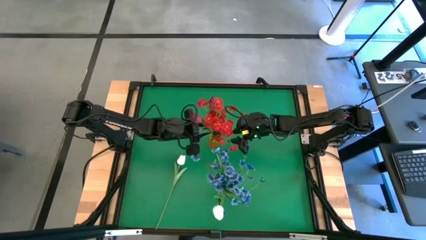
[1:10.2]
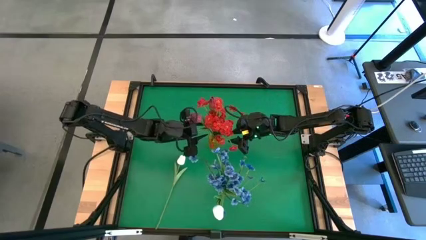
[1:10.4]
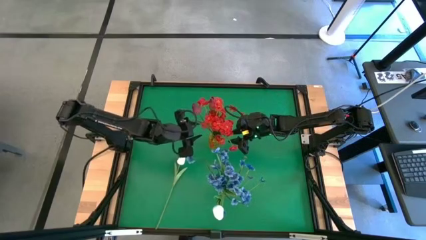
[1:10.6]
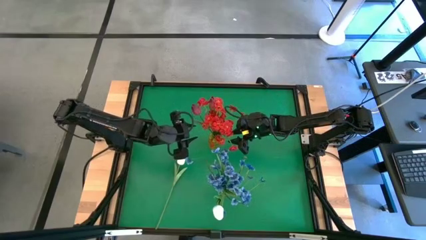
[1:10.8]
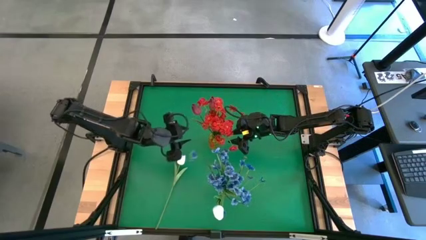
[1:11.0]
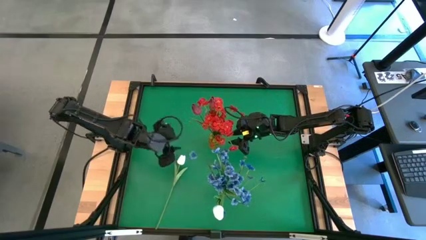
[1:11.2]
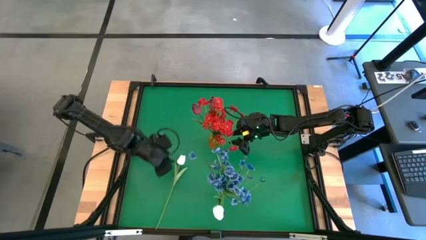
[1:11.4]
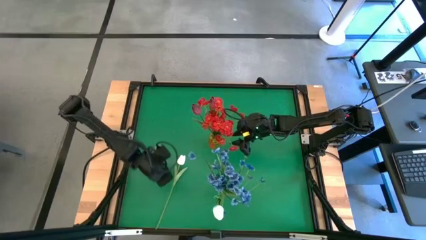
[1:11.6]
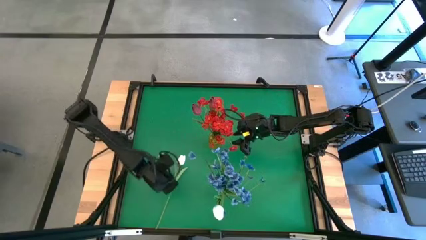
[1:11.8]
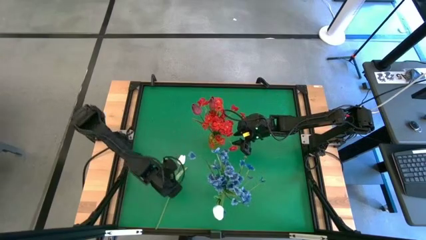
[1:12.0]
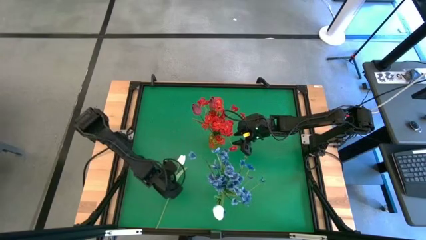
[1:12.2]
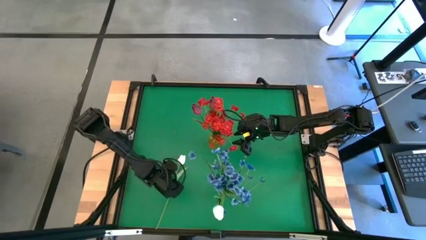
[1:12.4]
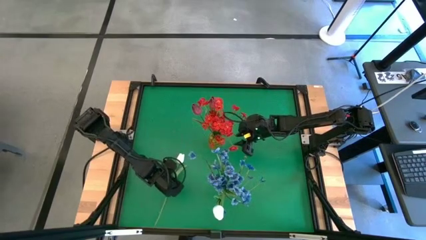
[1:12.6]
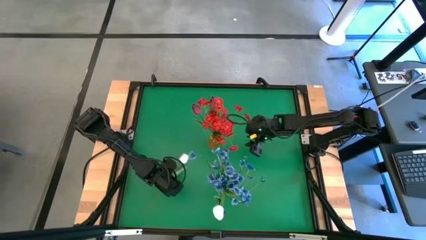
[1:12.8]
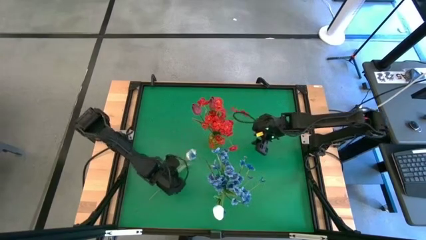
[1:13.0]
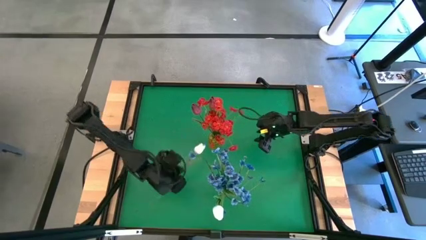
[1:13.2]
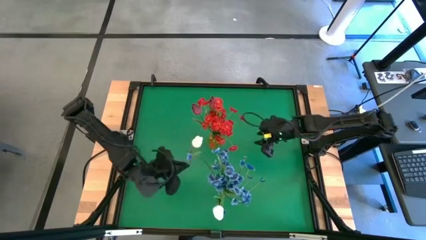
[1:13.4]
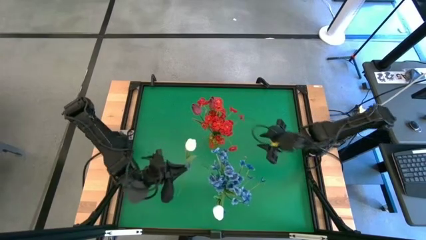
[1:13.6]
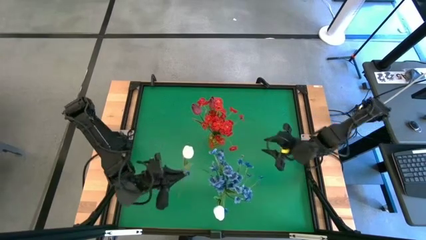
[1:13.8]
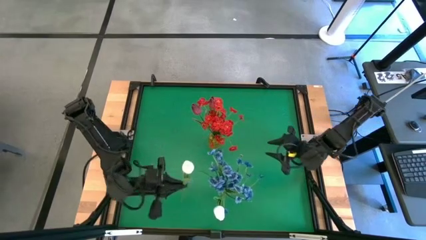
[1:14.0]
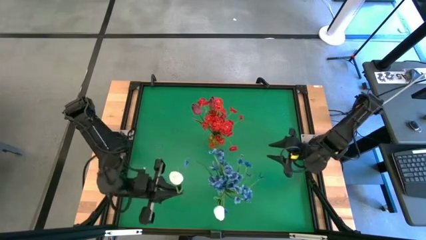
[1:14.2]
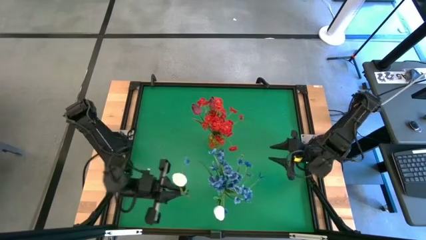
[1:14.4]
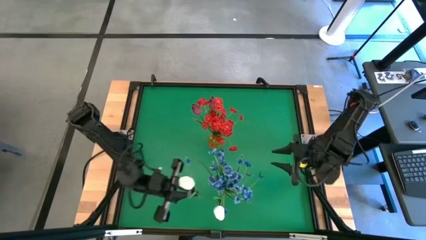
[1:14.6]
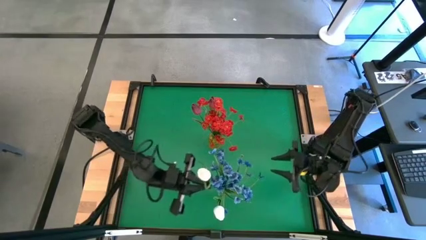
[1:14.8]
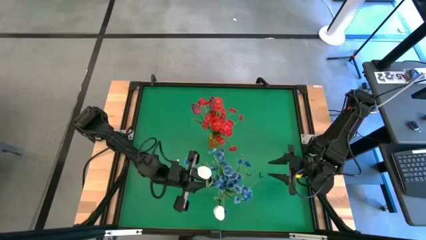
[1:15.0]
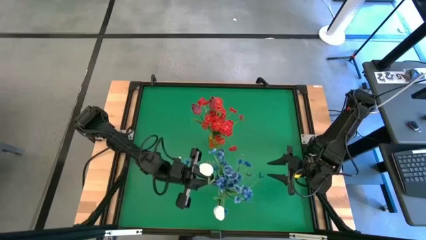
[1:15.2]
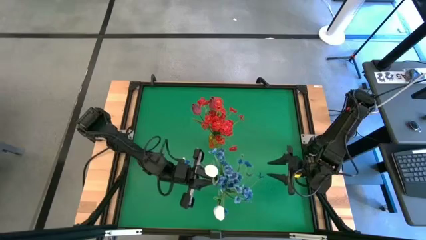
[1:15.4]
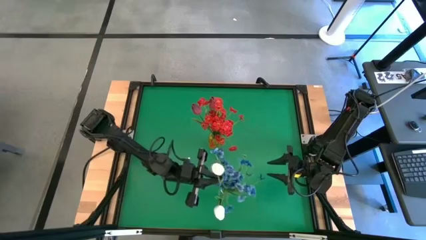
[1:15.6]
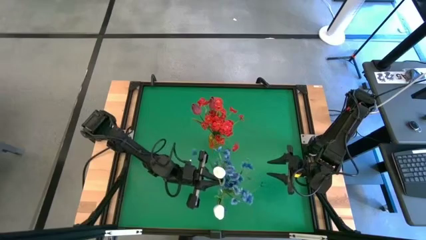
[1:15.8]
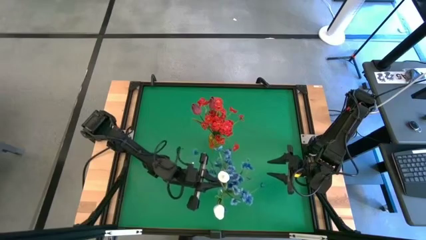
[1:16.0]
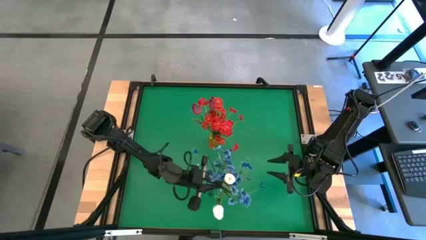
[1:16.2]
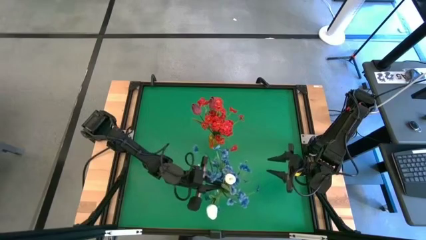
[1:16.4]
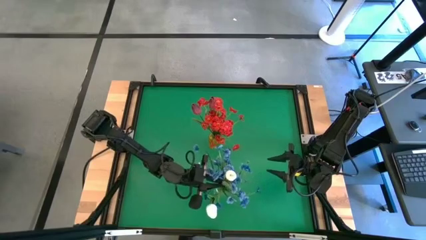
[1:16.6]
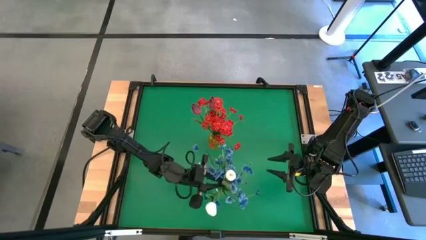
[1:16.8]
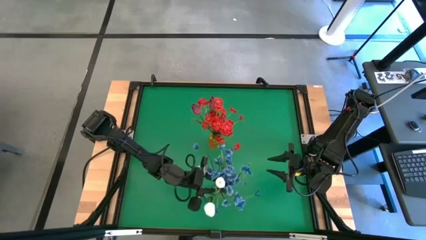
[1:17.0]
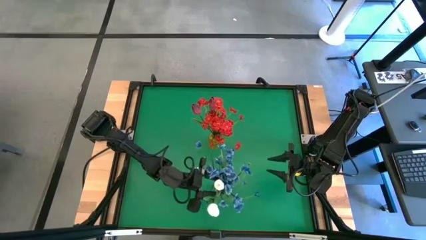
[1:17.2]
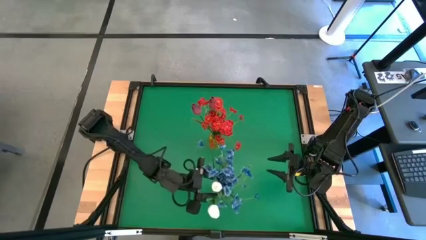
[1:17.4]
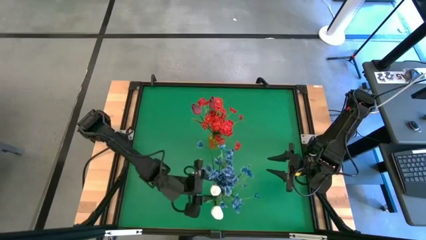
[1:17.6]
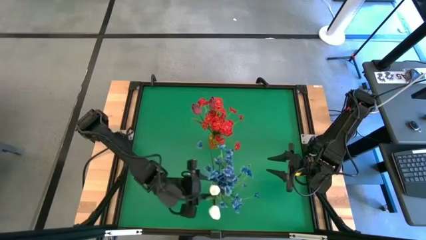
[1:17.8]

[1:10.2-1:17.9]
Task: Sort flowers into vase by color
Put the white flower into the transparent vase

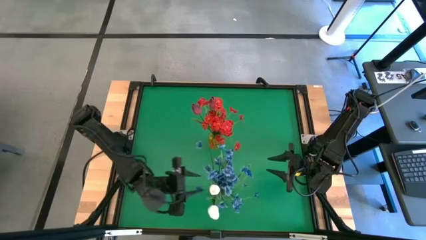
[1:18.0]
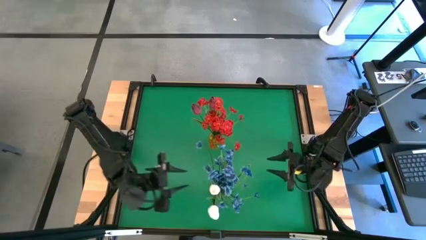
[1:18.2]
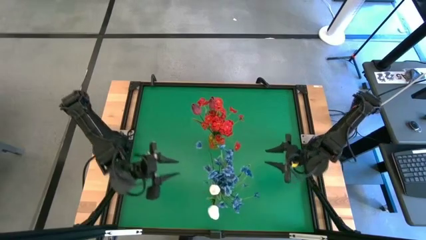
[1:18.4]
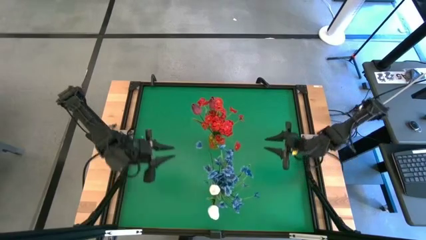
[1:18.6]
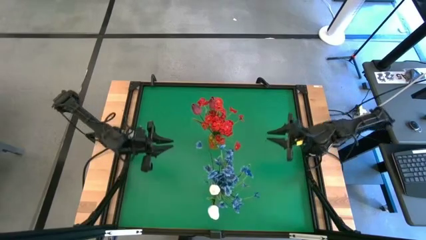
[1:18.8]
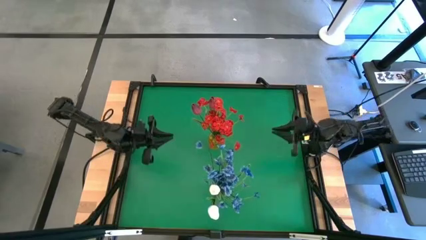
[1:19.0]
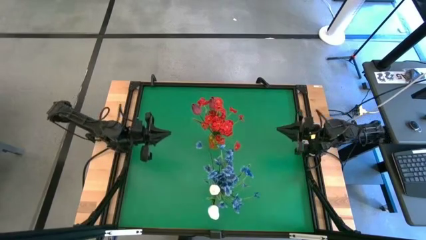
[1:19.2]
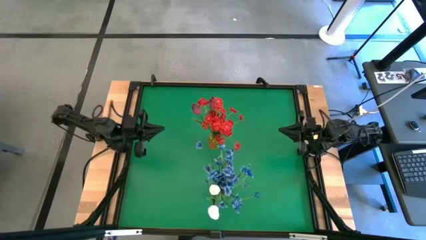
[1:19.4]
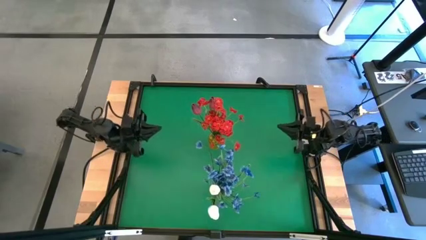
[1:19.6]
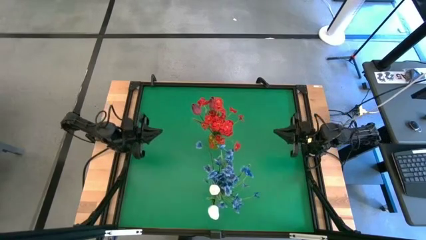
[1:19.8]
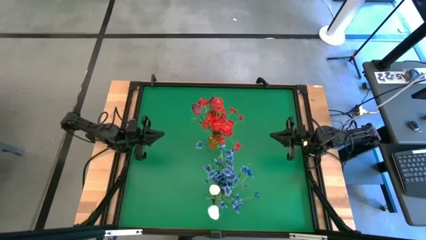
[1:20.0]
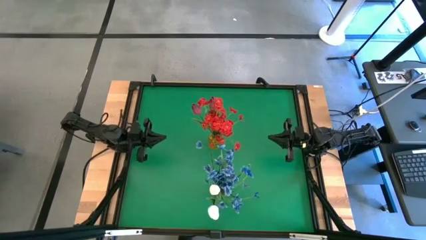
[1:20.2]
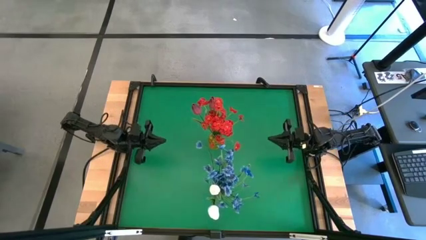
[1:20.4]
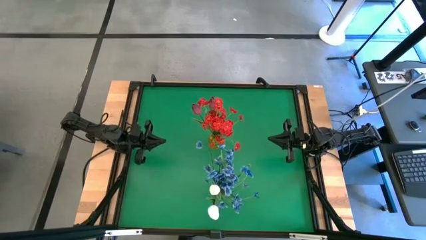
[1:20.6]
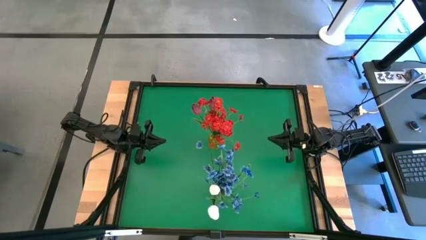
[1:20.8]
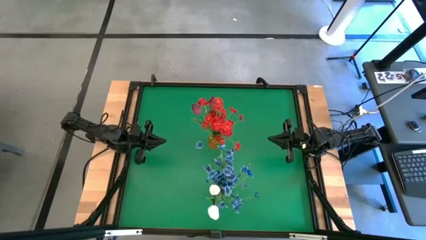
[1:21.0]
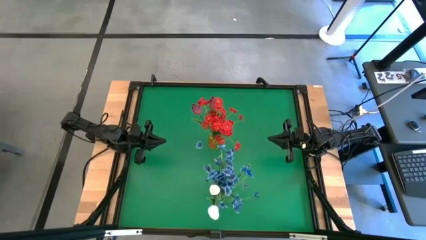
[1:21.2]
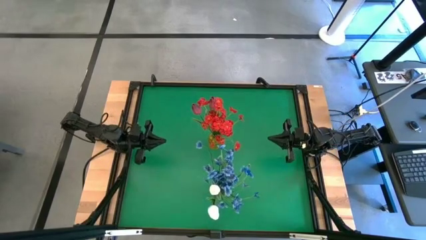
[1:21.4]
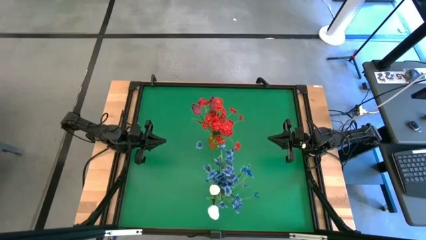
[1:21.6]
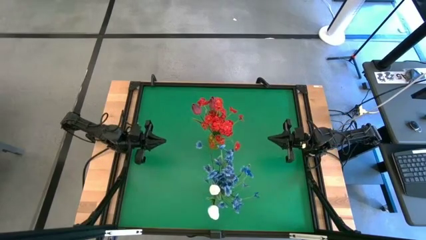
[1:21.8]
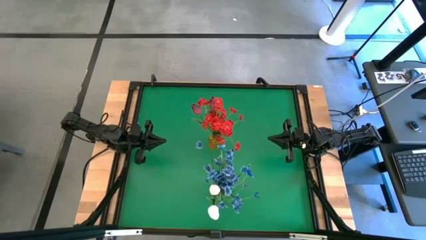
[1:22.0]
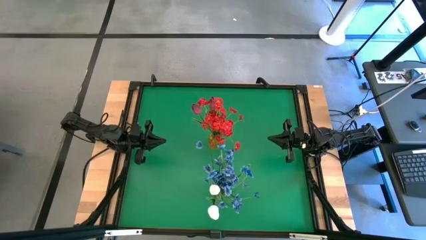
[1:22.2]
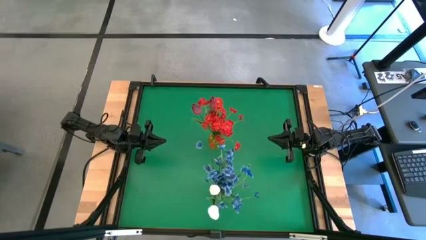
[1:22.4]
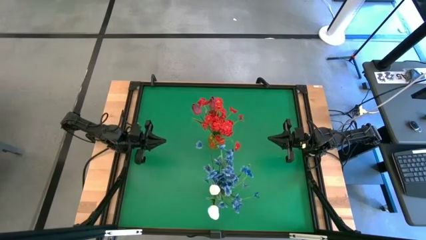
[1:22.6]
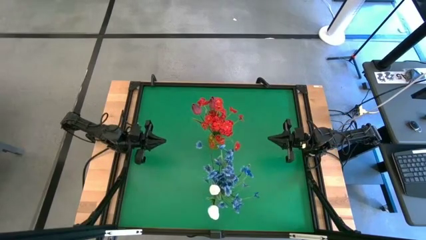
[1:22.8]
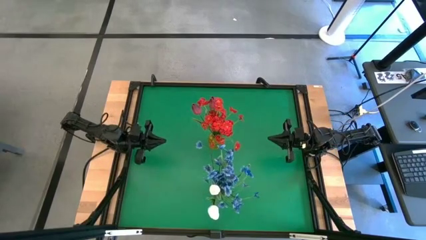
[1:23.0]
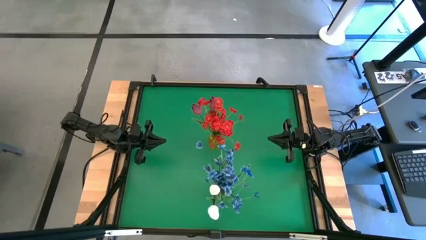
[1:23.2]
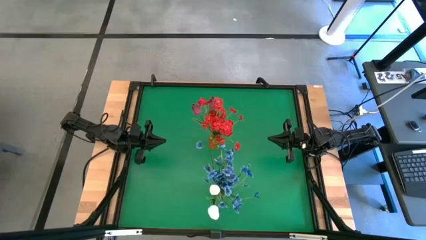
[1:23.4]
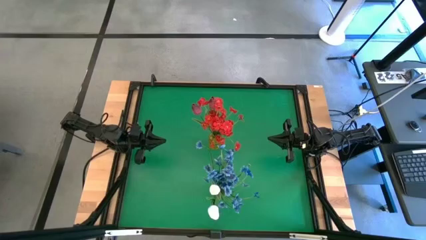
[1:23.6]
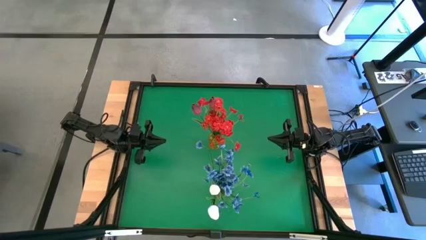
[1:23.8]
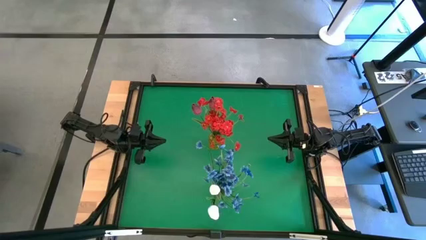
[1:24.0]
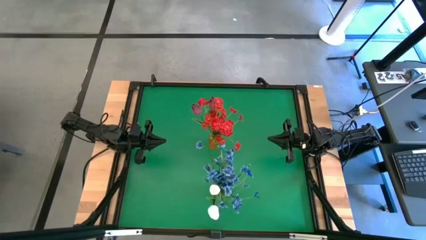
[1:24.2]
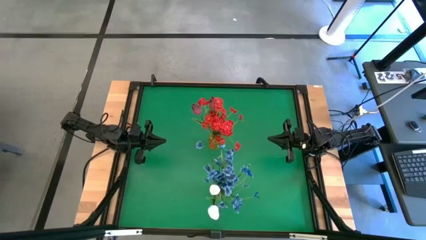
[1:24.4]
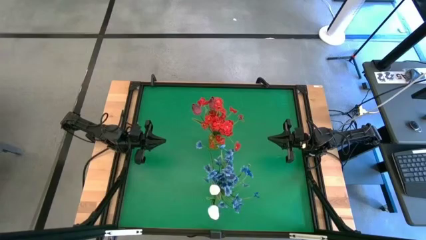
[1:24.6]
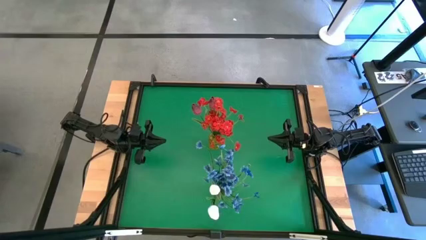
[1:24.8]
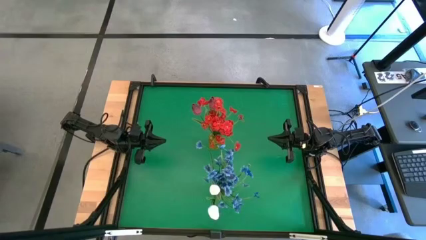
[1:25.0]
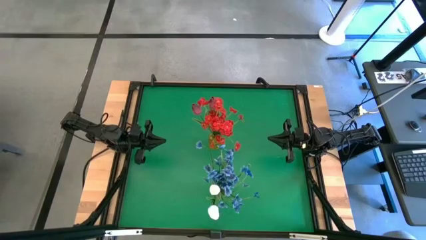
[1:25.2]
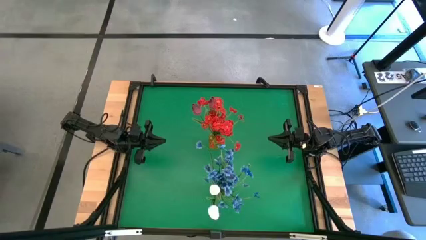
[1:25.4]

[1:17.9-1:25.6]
Return to Home Position
